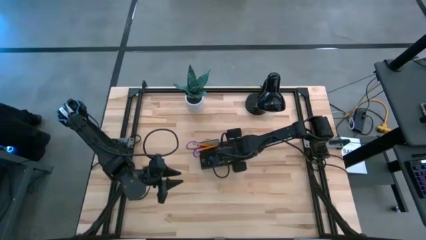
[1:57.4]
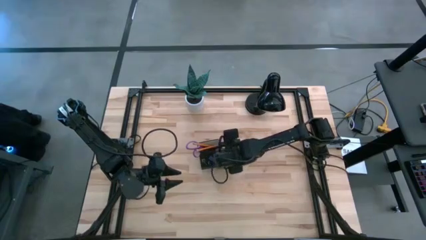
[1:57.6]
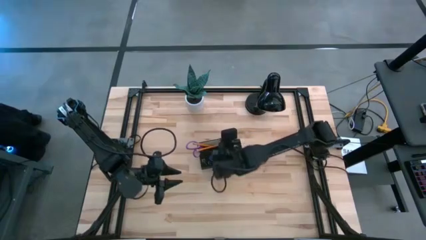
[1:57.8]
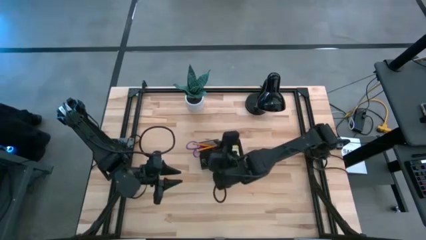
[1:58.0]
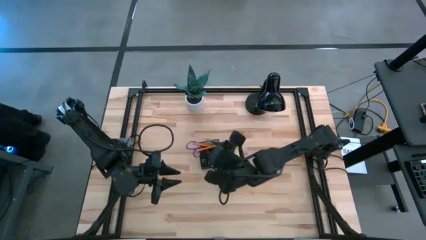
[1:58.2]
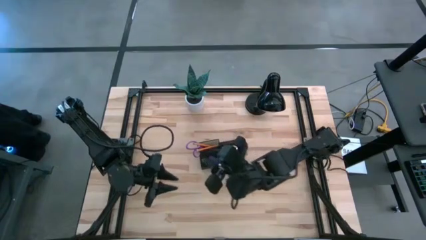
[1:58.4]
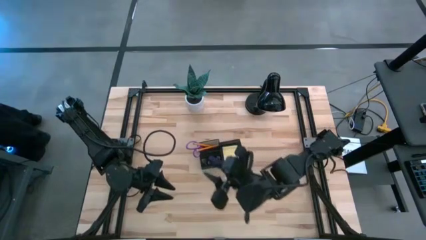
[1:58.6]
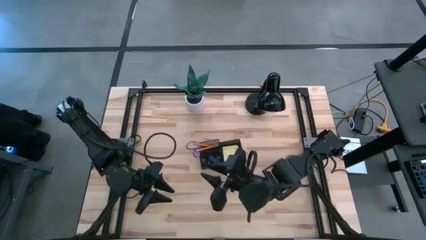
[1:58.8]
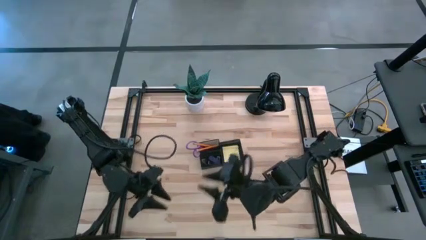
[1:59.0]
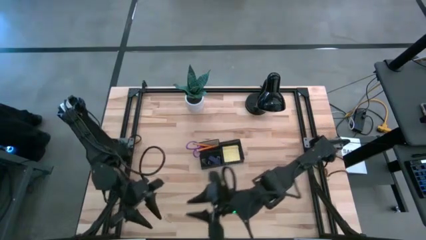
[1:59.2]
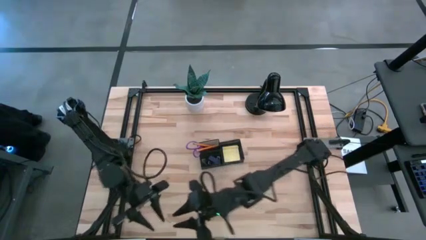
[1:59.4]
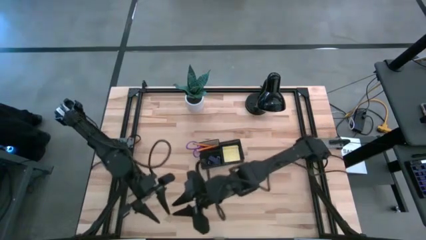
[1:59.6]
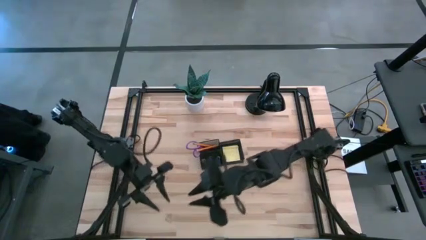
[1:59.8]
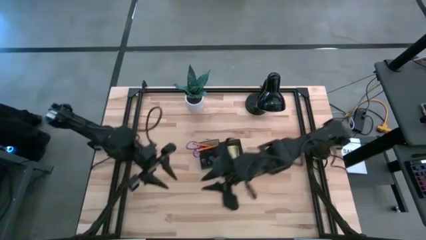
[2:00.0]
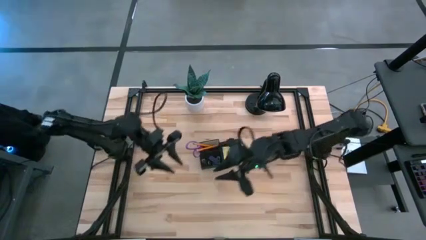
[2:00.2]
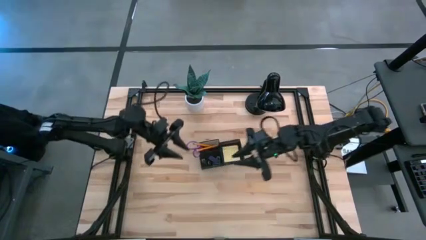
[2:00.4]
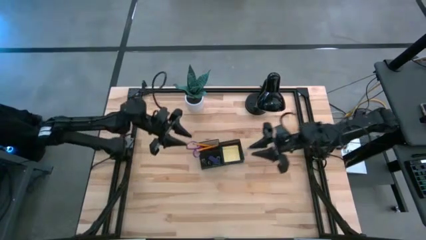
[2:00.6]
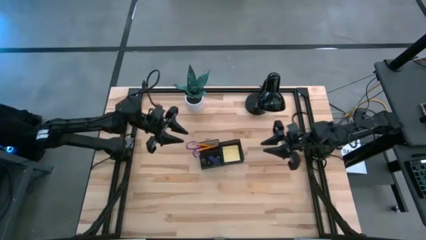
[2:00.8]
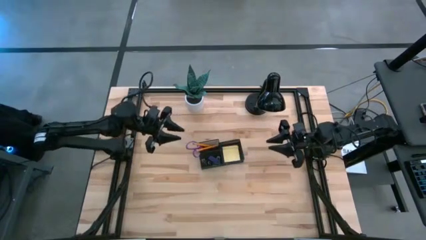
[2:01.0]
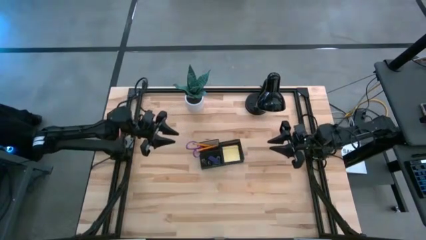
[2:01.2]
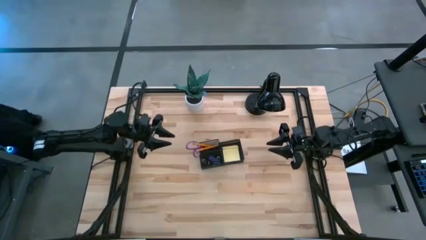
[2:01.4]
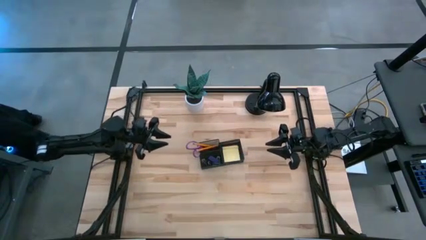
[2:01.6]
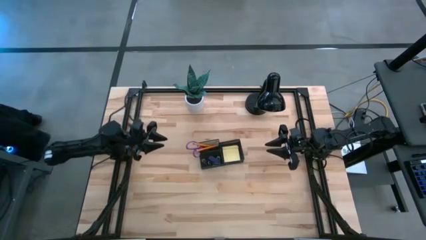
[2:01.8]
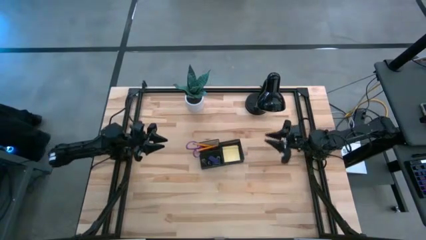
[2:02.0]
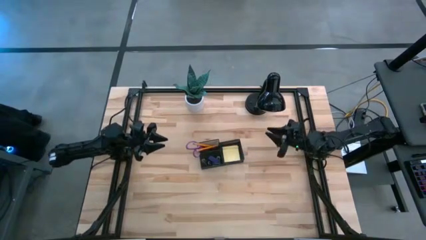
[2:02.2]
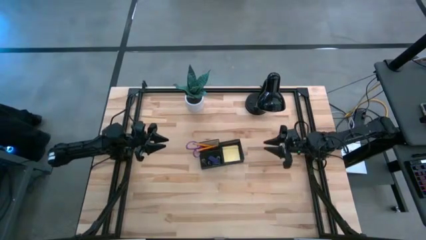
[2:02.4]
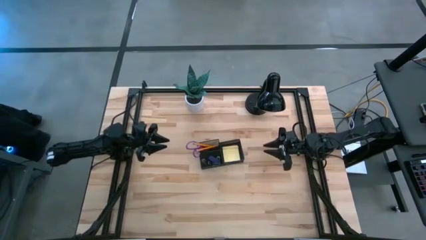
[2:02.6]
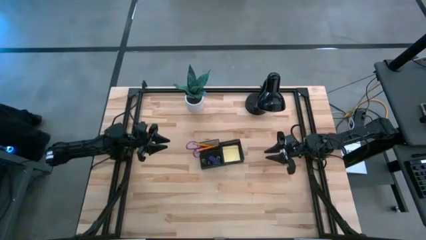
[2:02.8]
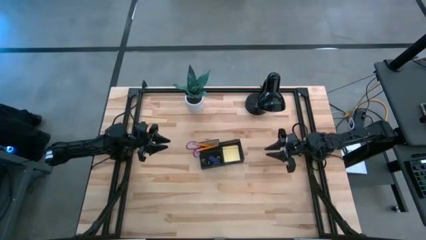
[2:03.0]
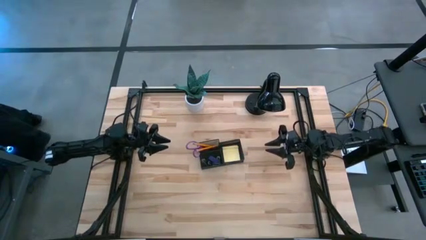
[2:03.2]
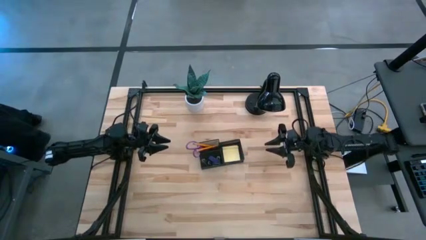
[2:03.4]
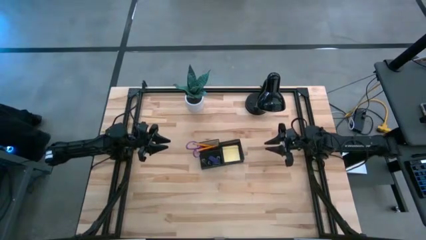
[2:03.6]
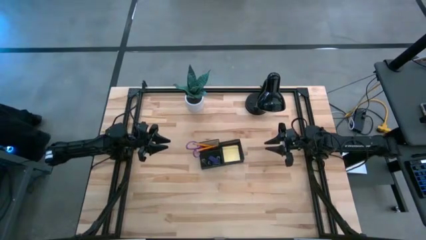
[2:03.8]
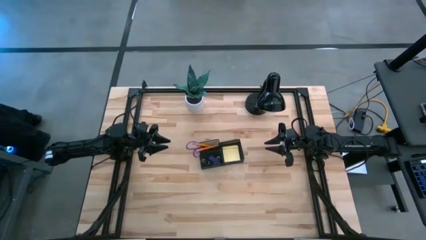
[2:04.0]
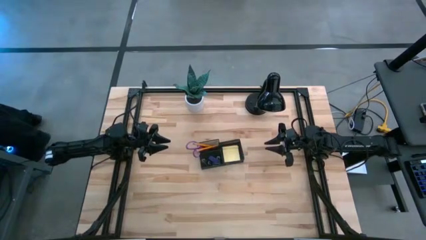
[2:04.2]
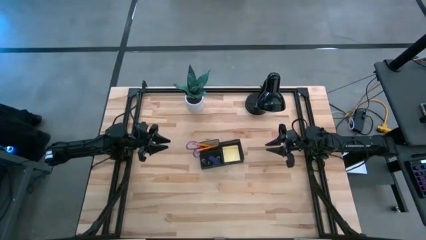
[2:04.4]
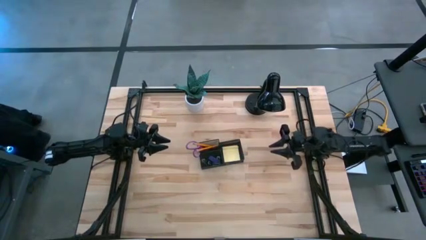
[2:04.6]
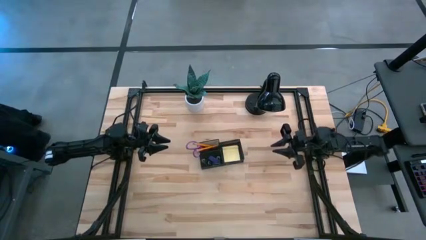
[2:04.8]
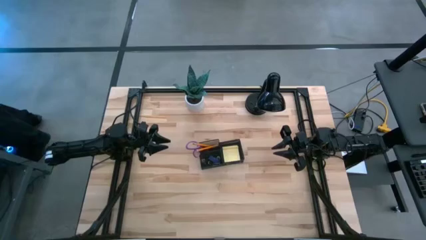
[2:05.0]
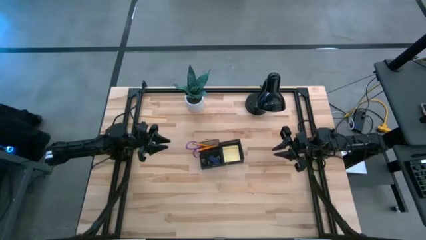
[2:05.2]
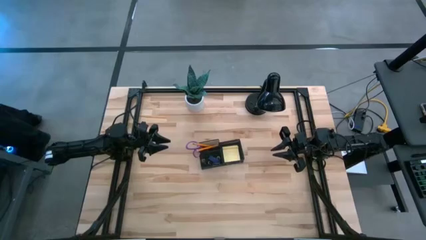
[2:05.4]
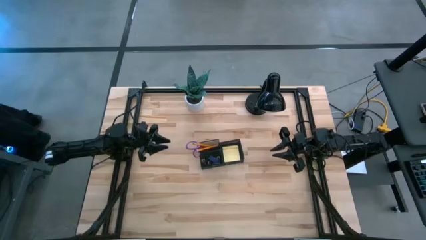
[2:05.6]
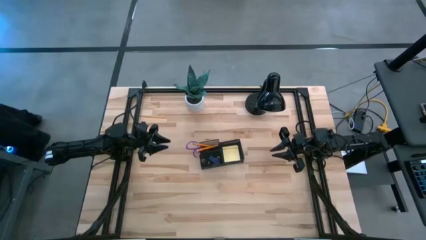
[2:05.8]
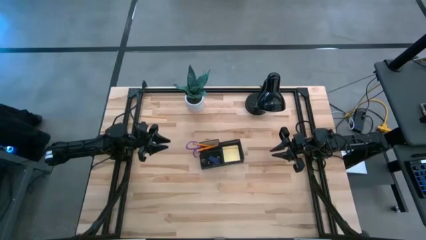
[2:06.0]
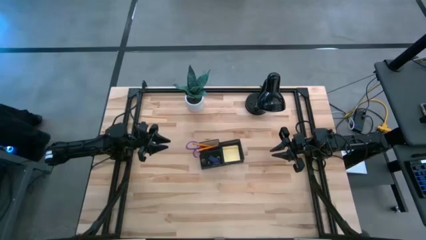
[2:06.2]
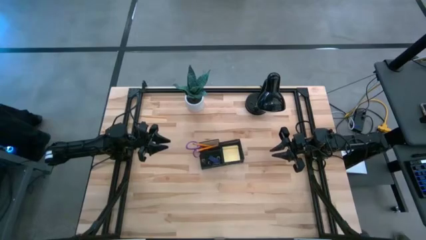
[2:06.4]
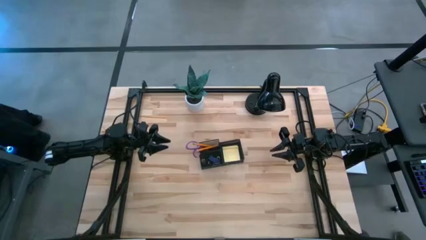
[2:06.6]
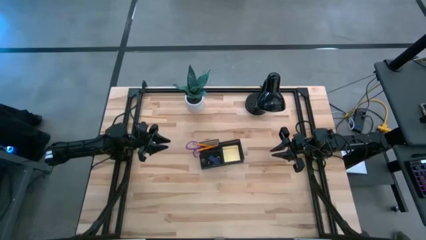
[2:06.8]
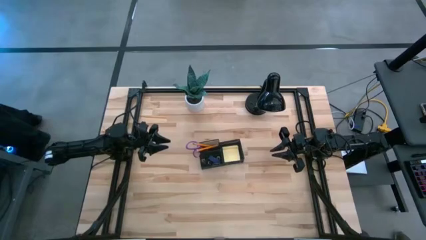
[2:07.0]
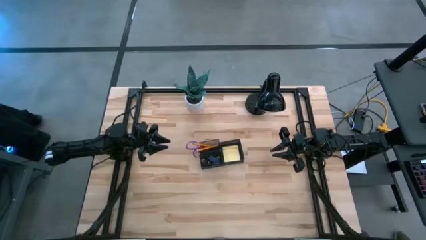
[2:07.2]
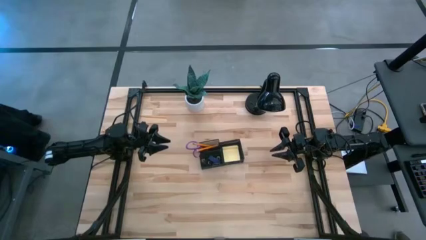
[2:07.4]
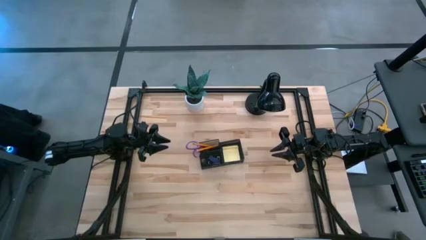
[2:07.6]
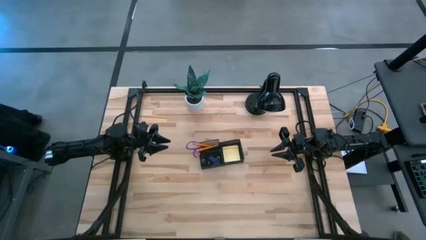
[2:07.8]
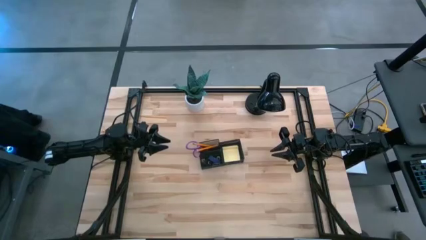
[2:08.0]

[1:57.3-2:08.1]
Task: Pick and place office supplies into organizer
Return to Home Position

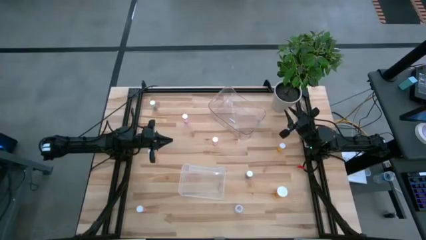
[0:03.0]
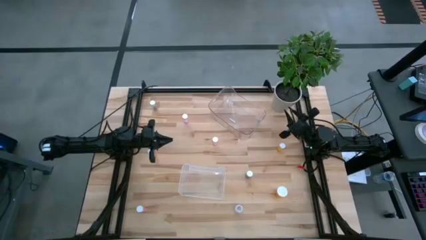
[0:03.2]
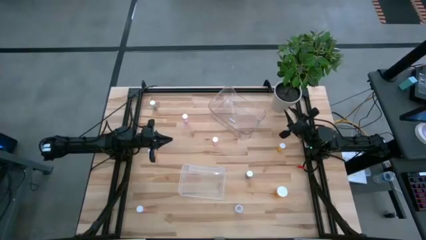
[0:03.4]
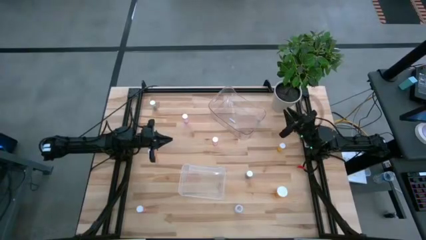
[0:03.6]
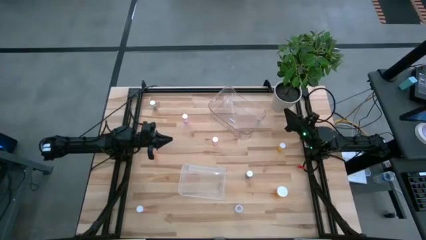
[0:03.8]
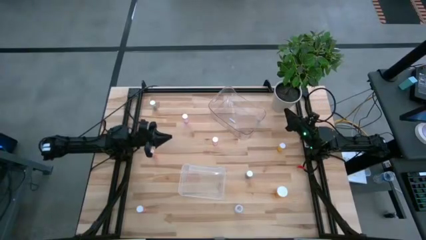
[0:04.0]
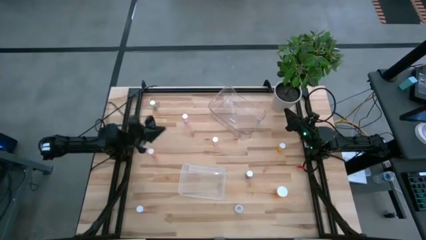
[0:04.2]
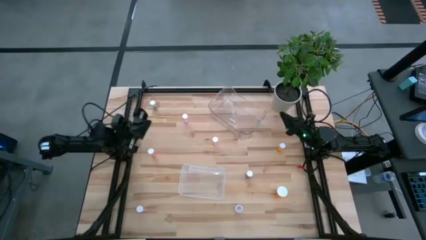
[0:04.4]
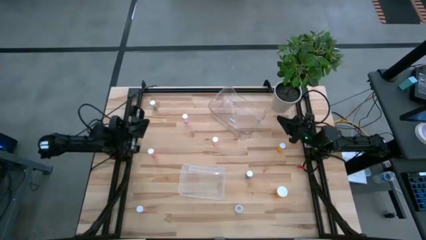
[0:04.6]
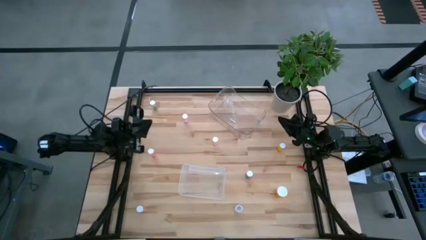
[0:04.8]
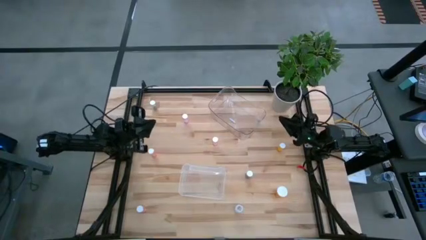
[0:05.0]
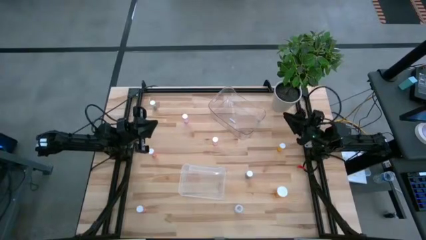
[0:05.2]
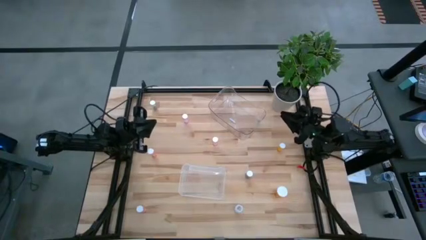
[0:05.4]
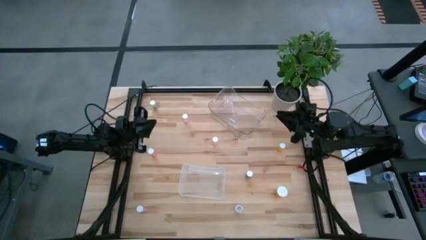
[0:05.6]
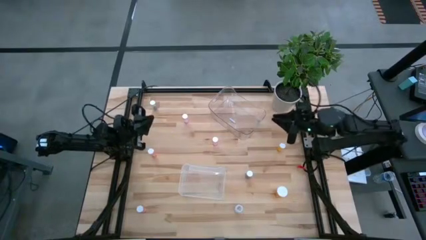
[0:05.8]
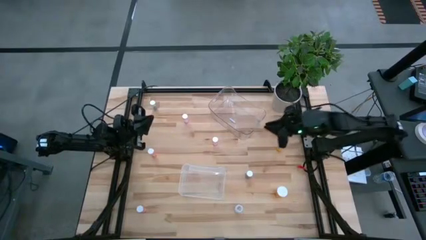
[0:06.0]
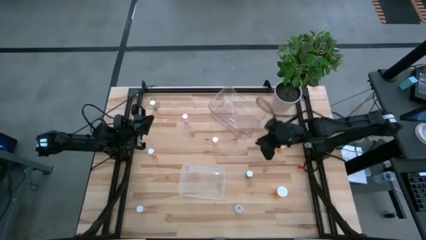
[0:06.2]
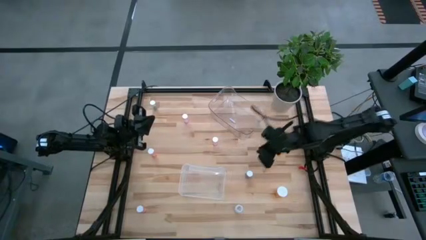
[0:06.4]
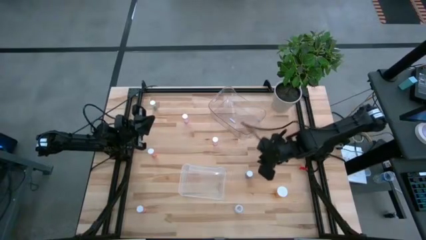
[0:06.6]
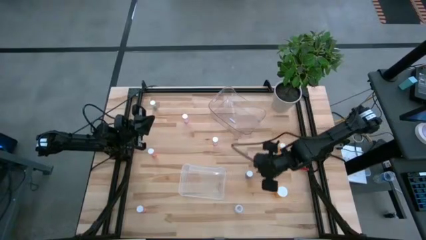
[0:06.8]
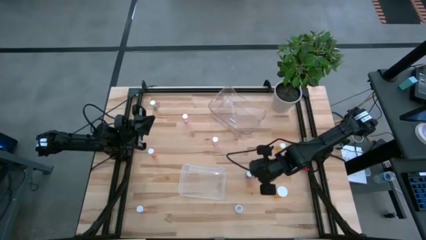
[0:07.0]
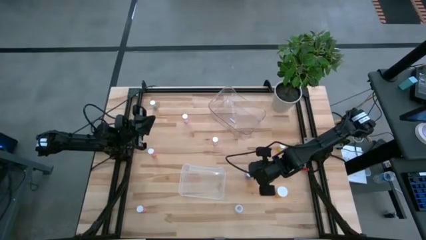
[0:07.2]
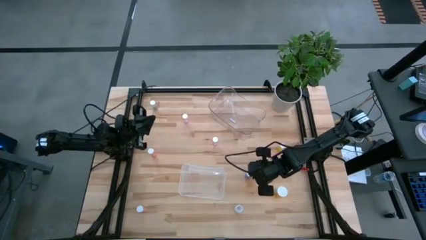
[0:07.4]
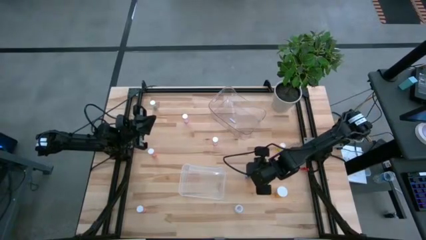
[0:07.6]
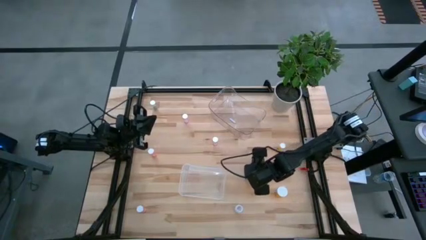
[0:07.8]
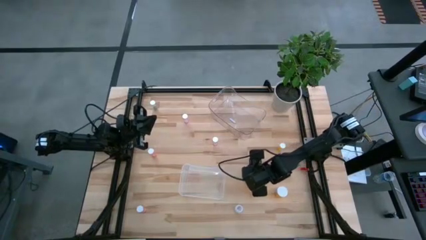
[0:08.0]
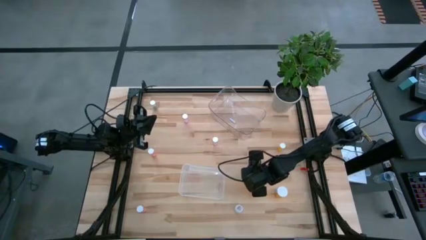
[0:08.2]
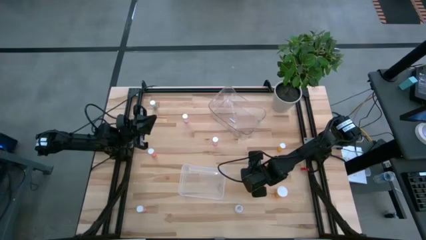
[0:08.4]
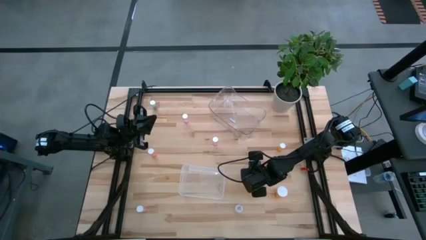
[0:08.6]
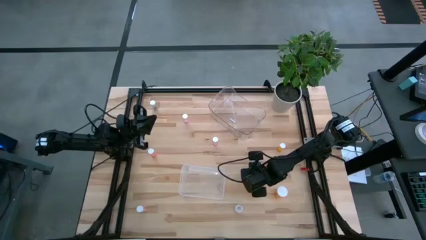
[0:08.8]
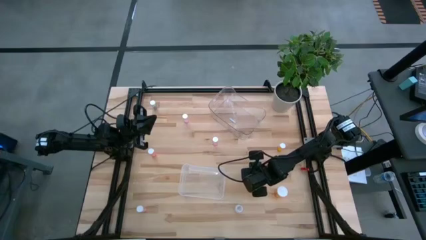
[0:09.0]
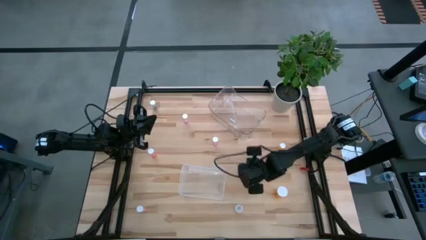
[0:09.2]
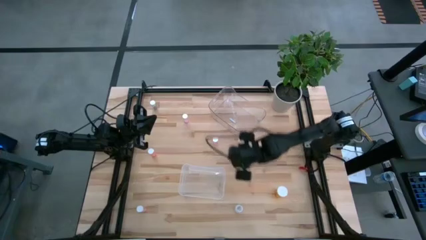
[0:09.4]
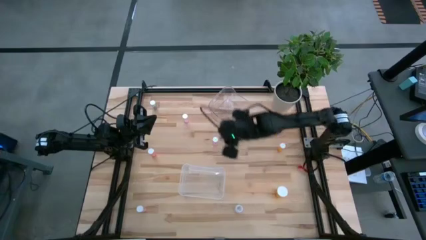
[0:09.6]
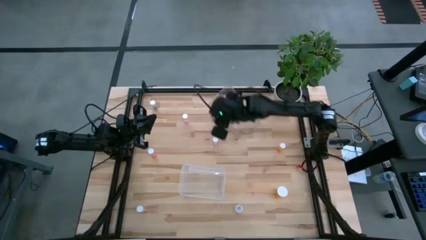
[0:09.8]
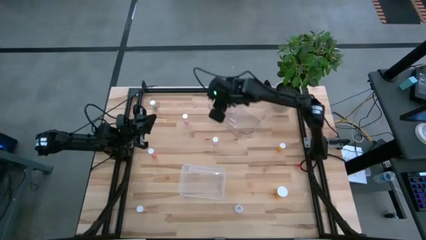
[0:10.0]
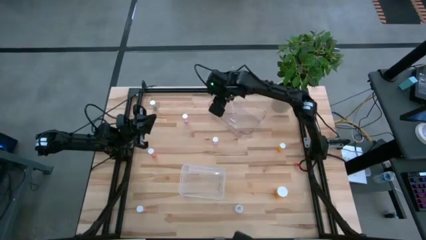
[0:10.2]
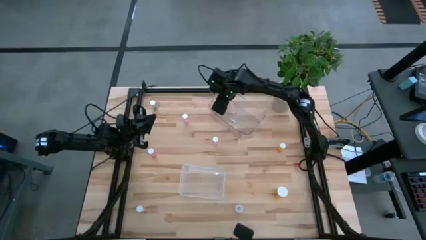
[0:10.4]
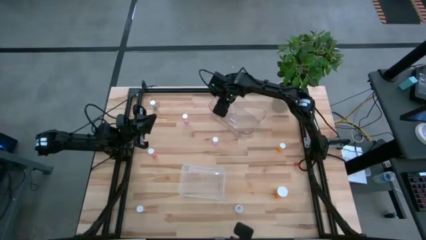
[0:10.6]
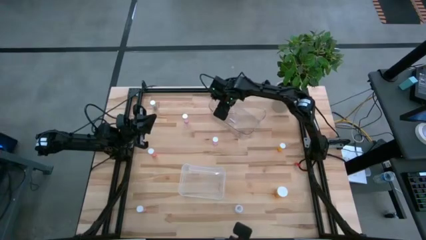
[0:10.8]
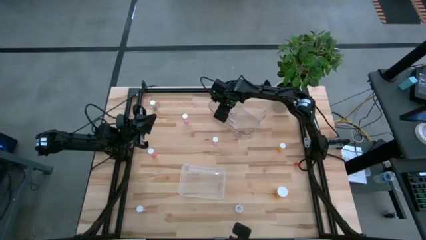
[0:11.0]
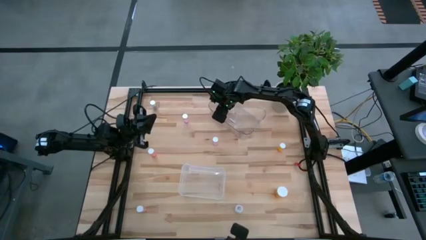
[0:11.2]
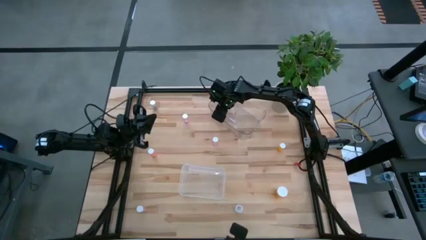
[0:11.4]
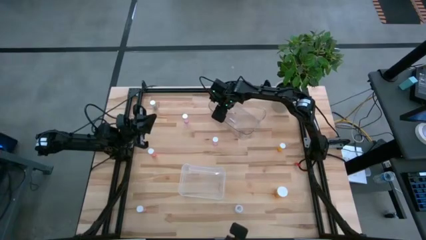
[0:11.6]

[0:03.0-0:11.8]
Task: Pick and place medicine bottles into bin by pill shape (circle, oval)
Put the right blue capsule bottle into the top transparent bin
